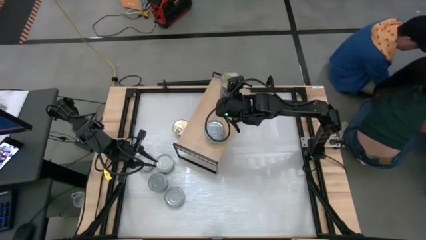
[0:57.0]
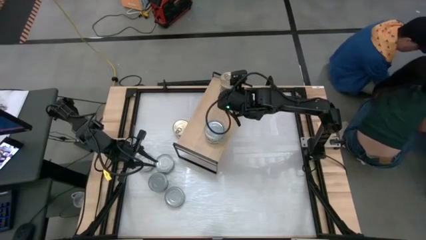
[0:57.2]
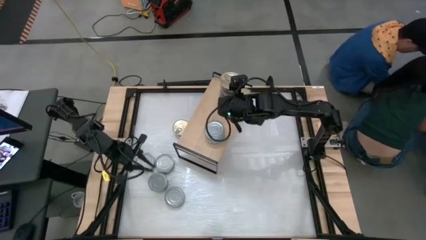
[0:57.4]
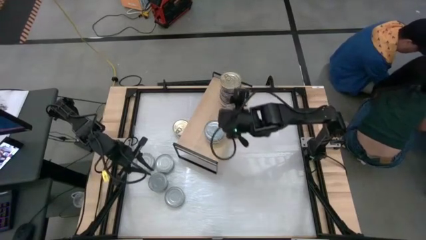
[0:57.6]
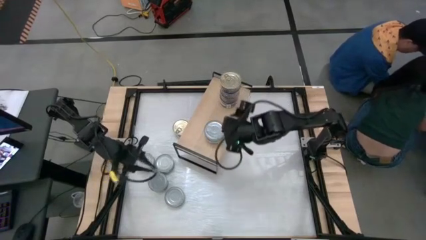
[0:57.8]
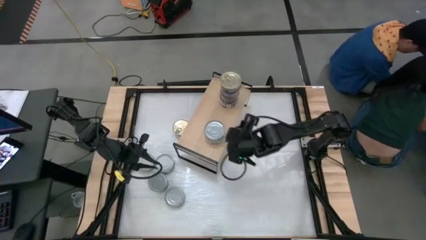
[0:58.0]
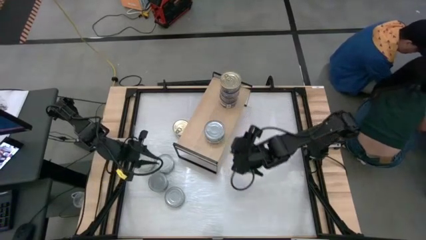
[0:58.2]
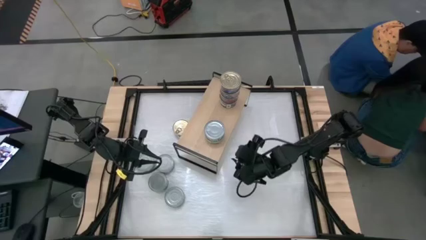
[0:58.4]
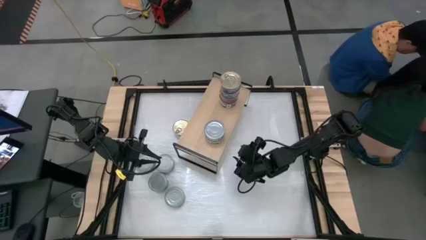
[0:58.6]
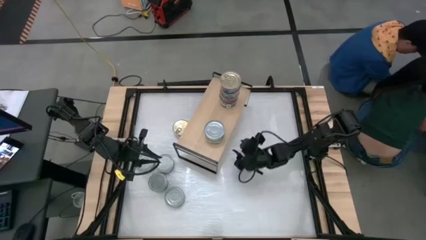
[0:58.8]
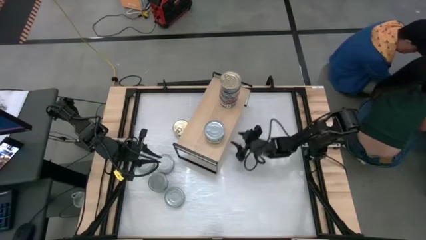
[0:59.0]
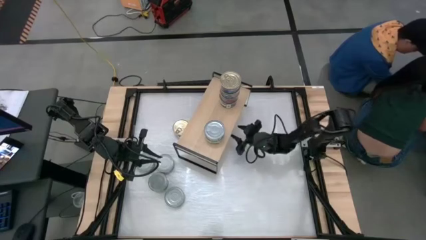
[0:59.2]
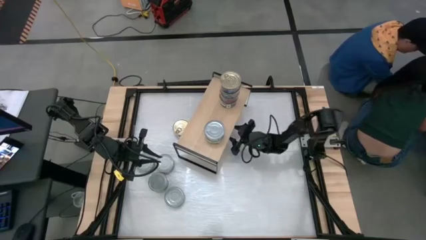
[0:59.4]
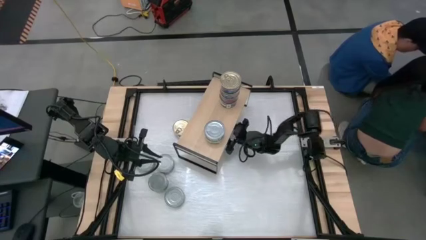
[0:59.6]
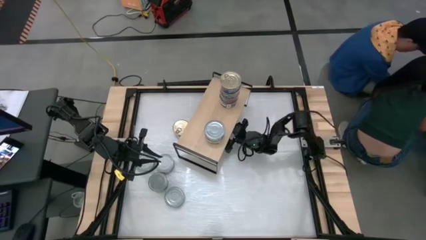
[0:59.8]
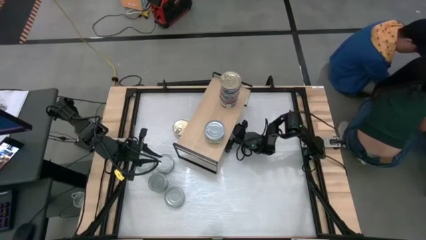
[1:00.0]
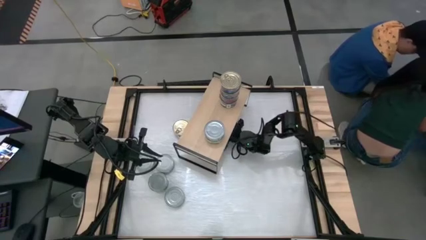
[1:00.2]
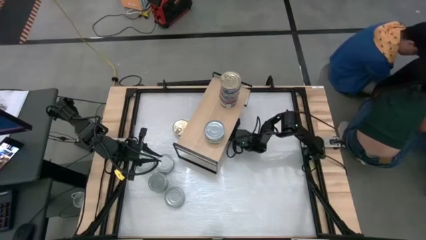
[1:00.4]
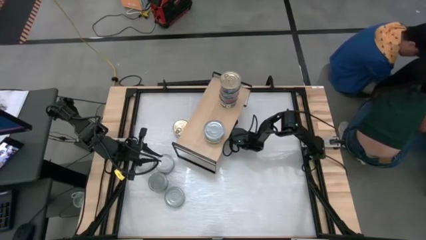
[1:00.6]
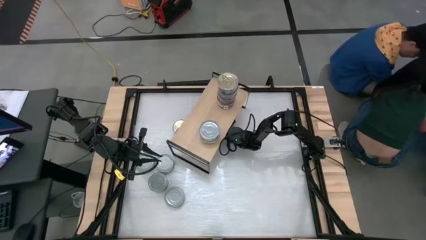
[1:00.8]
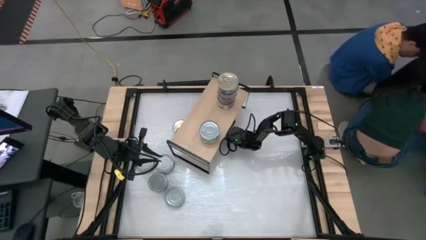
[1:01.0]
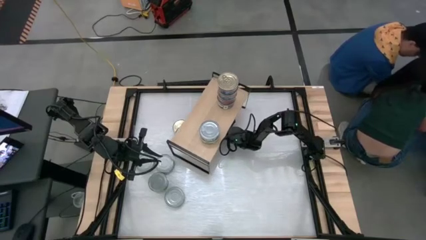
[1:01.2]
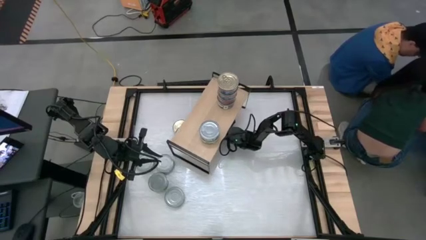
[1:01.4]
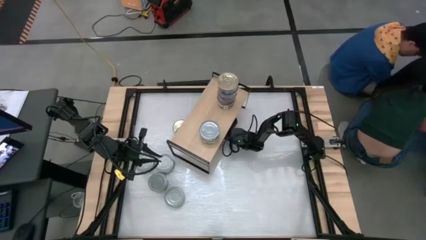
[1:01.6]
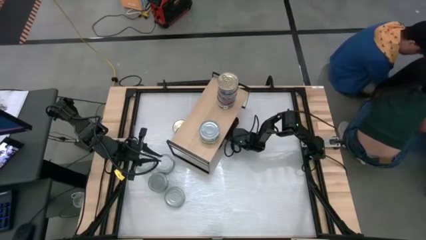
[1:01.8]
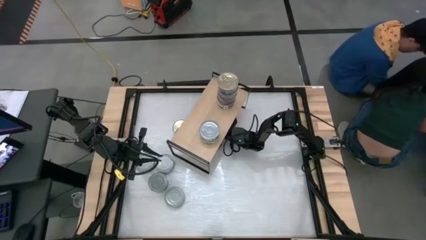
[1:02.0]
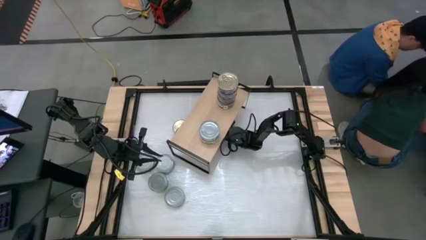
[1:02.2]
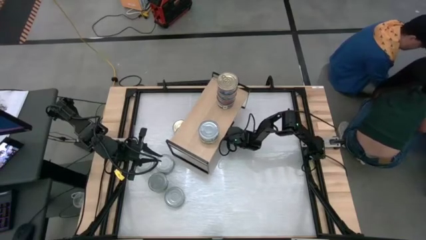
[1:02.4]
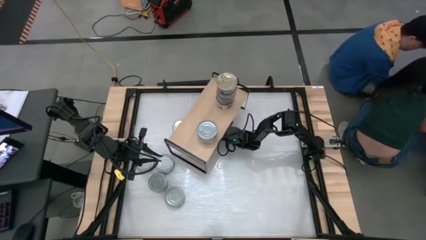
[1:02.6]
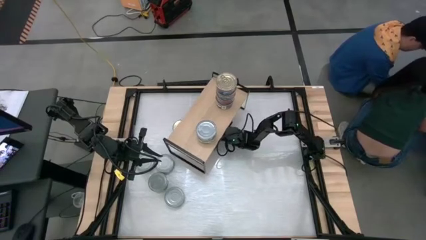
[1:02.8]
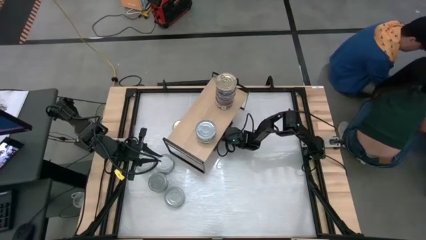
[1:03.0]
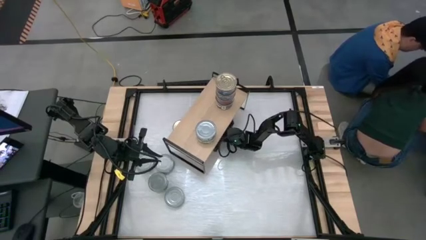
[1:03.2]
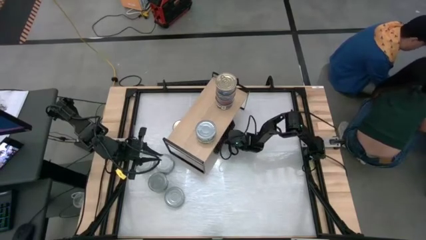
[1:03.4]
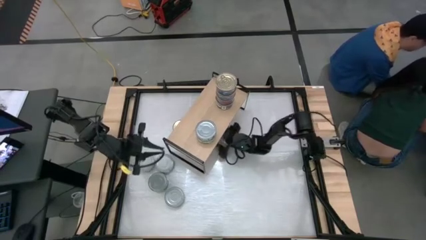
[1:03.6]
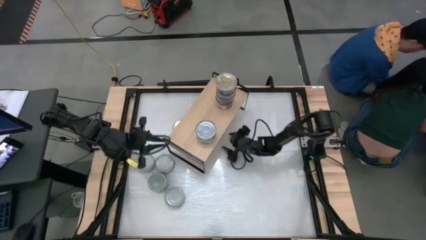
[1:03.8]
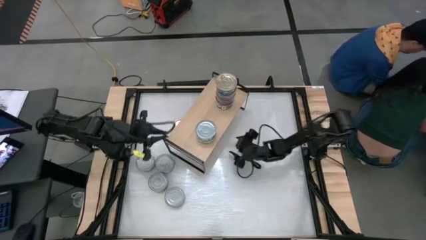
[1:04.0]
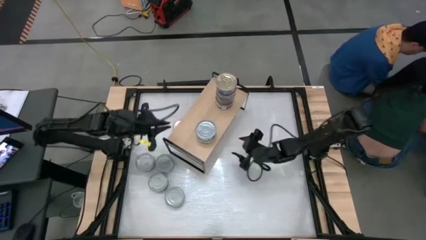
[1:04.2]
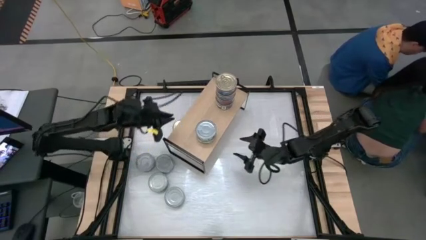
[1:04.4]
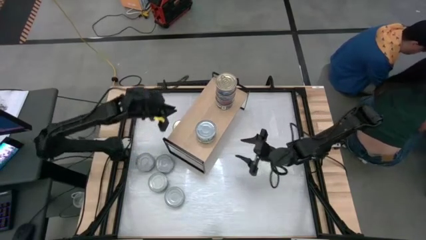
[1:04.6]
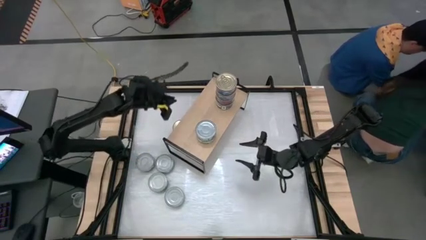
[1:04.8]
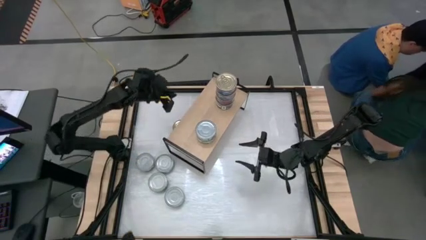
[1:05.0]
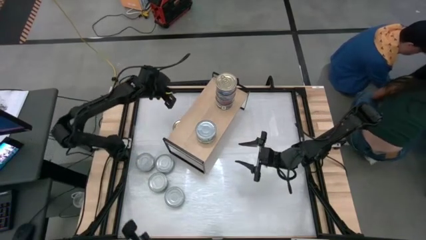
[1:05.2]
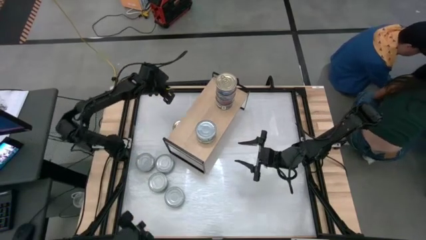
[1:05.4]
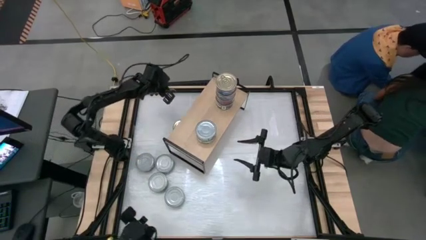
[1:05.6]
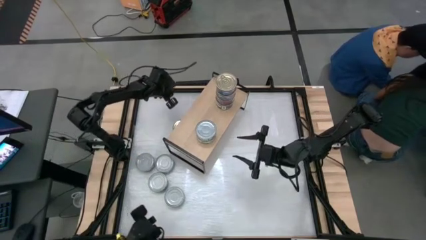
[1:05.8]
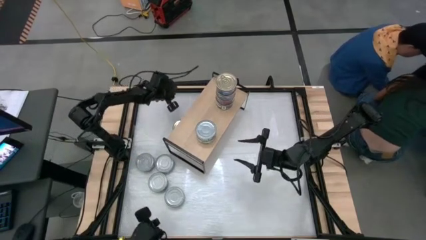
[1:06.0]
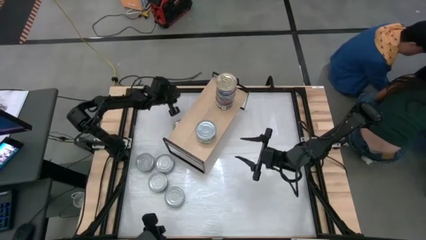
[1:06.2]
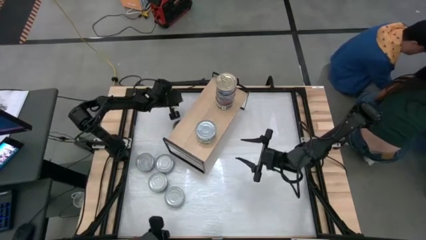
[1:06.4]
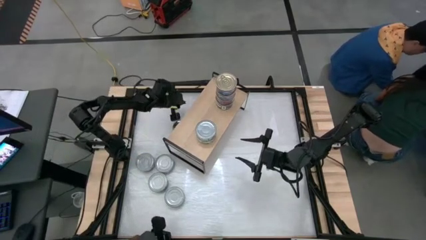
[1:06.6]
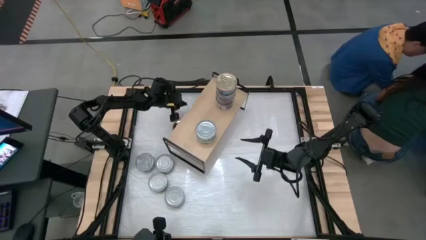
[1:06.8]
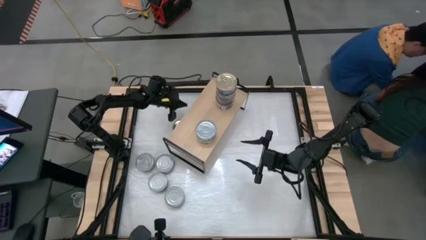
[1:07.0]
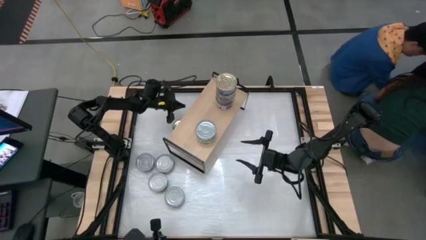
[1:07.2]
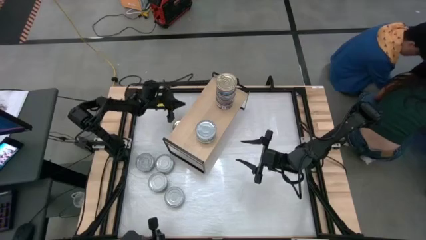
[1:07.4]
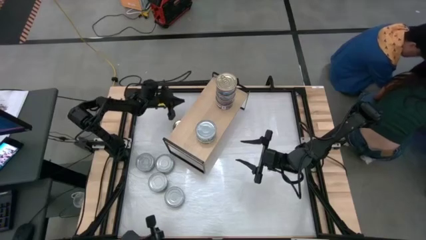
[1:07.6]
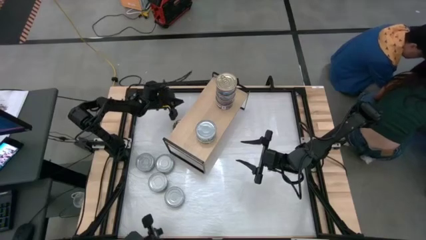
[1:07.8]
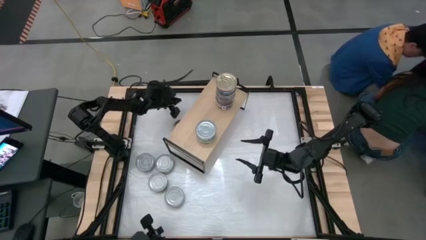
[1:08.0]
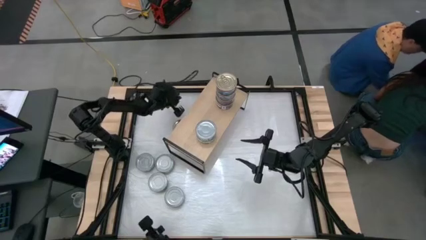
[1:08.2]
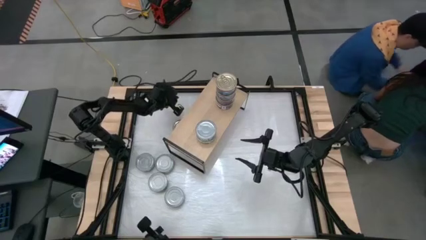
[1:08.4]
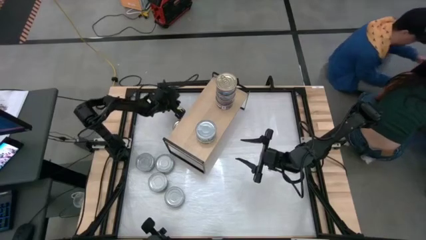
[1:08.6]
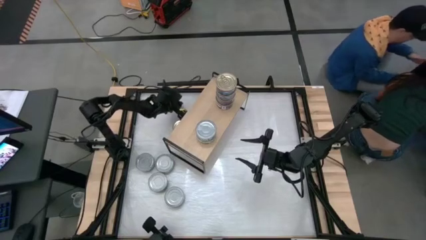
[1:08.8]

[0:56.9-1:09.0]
Task: Stack canned seafood by type on shelf
Adjust the blue tuna can
